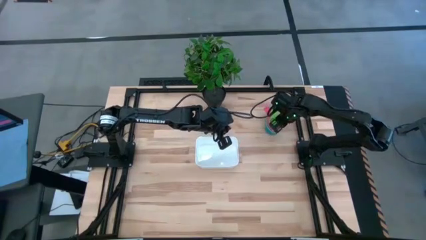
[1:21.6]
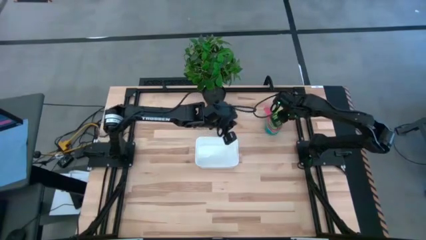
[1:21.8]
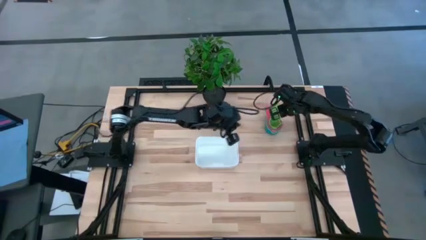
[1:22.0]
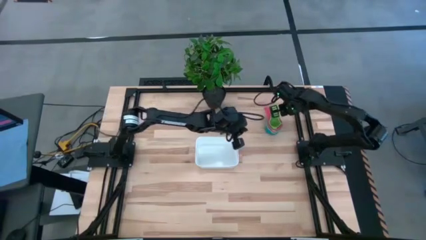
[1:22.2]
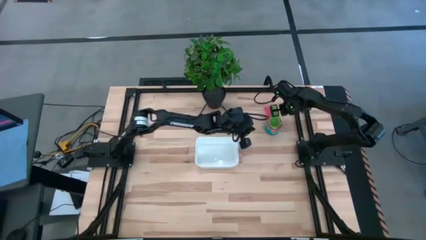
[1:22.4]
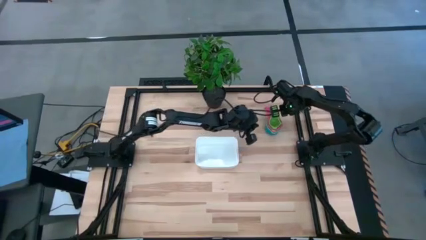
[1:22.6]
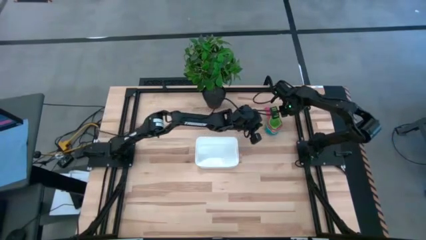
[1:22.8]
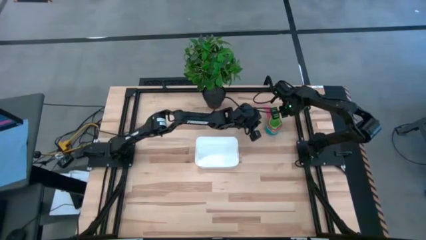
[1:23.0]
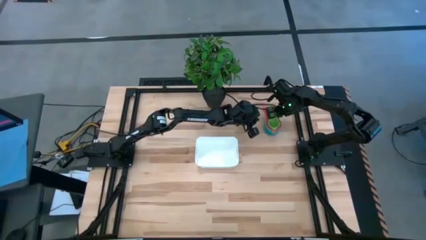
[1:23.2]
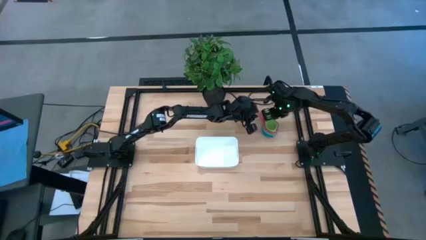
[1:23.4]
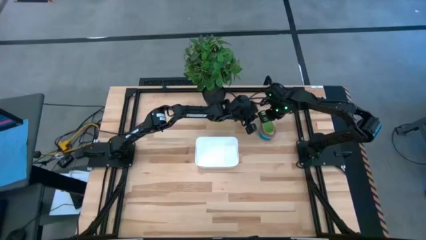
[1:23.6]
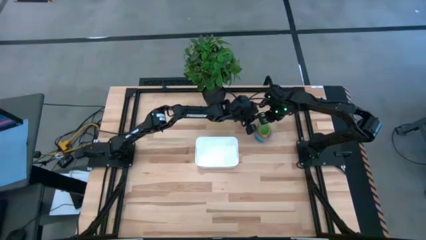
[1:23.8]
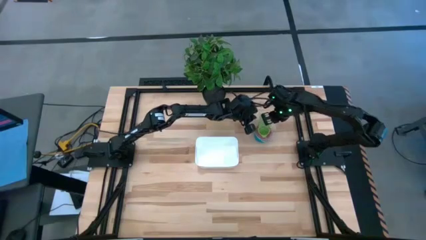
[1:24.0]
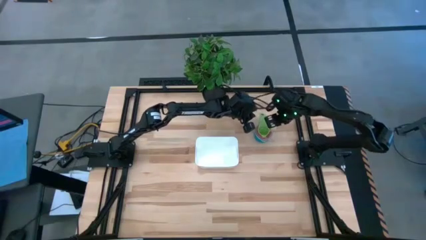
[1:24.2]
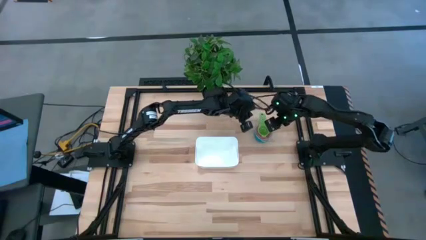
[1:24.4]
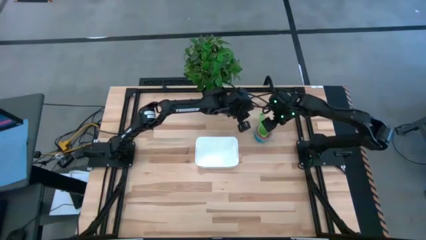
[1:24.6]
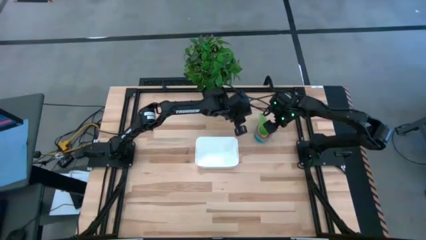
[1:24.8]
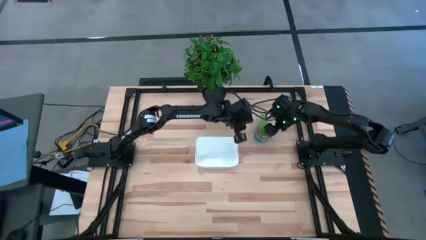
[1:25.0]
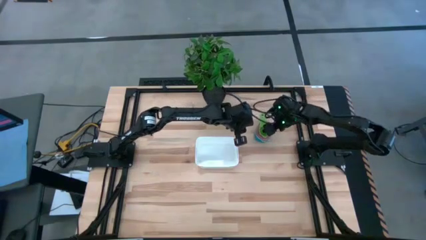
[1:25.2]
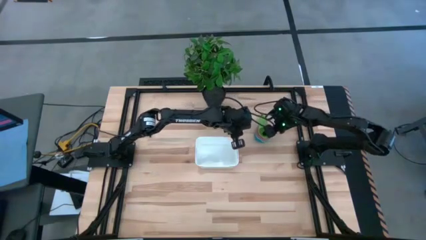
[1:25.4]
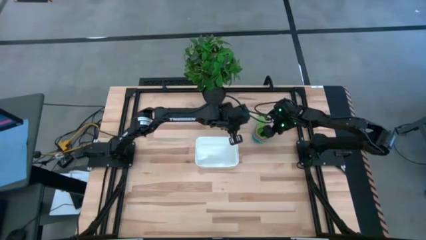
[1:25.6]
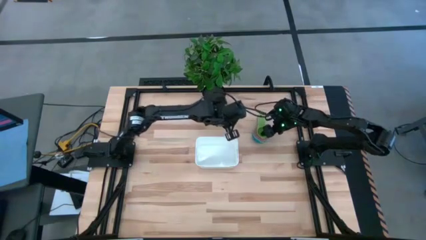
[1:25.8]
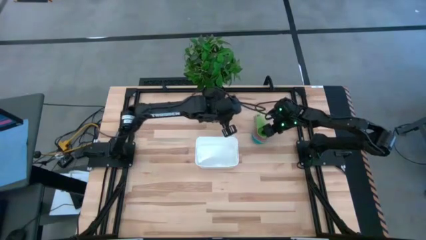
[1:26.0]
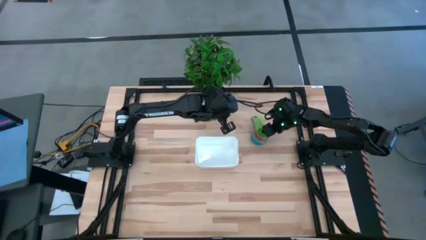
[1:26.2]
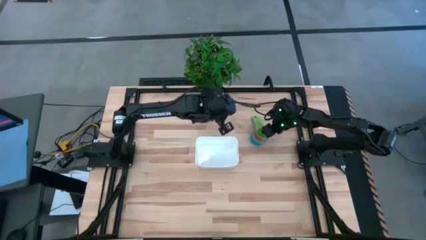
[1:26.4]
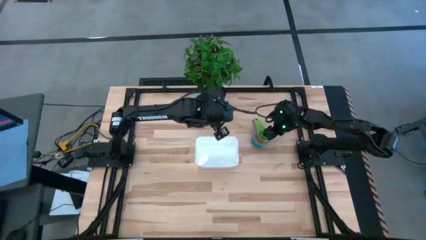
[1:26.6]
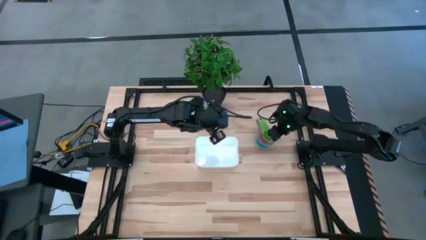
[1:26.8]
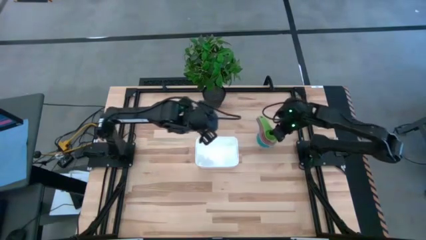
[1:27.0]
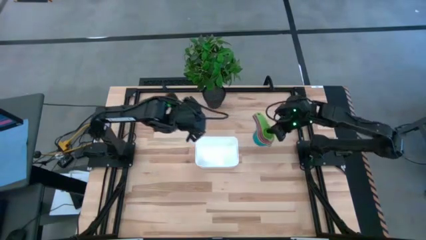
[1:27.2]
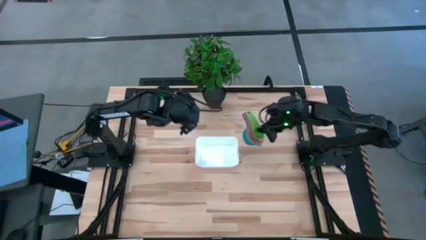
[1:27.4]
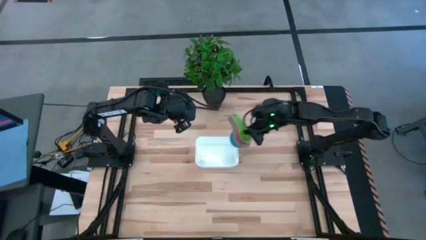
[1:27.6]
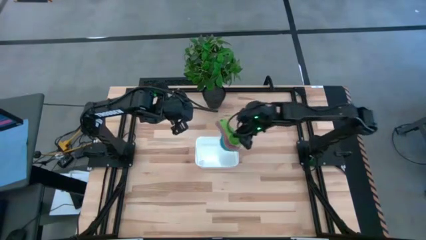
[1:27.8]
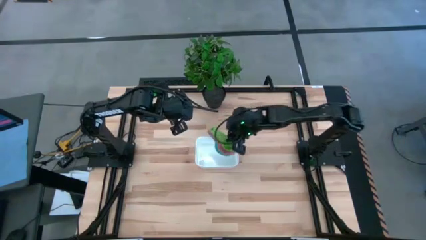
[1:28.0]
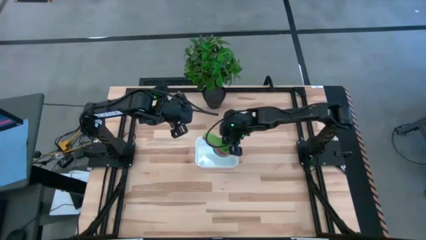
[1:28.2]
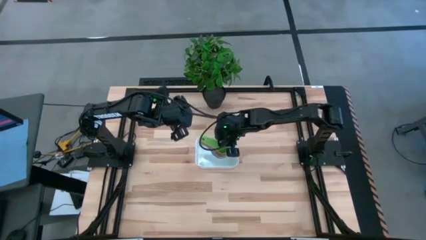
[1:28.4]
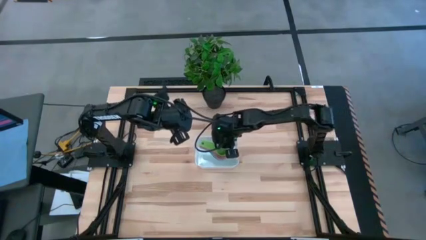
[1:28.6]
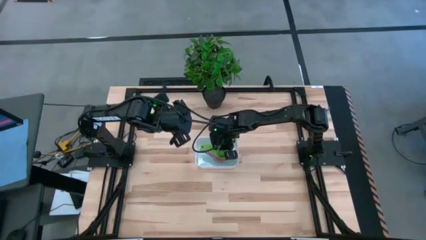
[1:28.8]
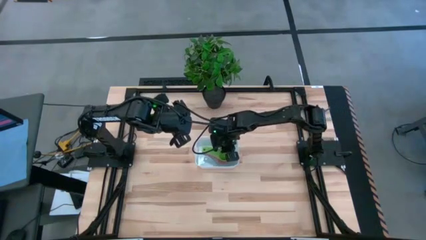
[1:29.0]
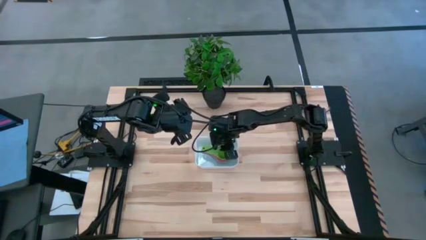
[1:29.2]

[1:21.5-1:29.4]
Task: Nest measuring cups in basket
Put the nested measuring cups into the white bin

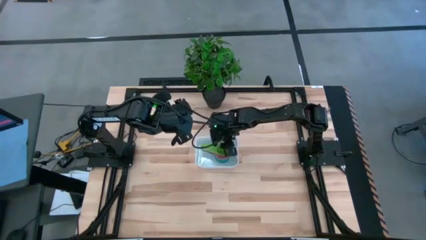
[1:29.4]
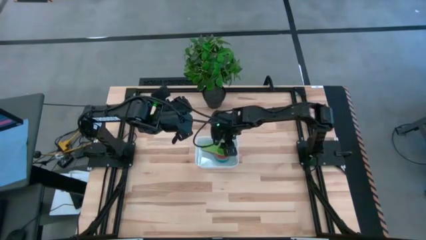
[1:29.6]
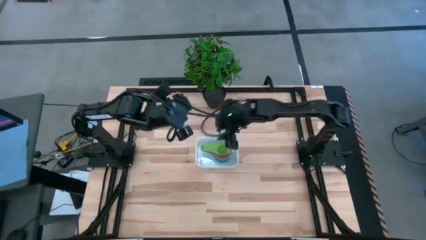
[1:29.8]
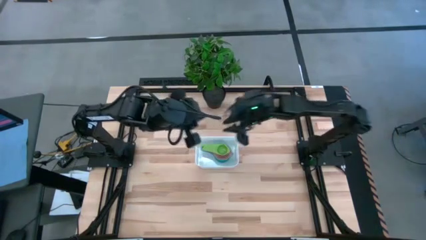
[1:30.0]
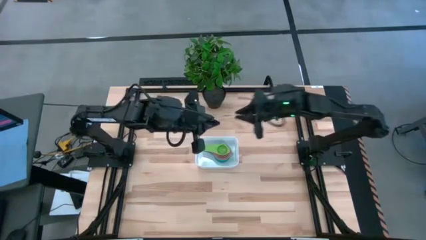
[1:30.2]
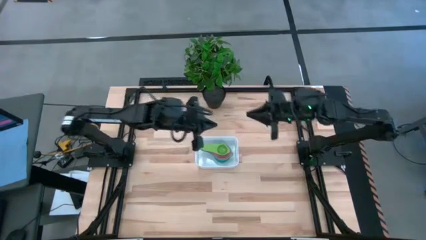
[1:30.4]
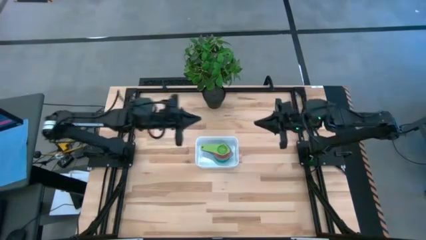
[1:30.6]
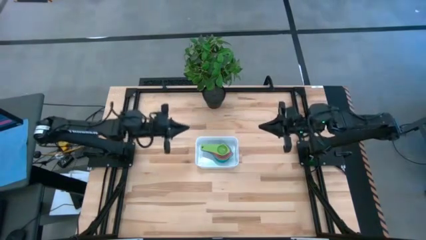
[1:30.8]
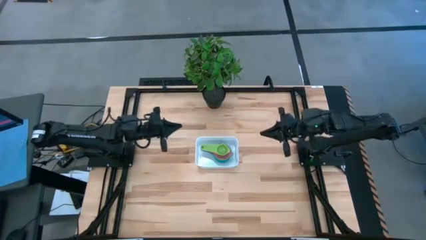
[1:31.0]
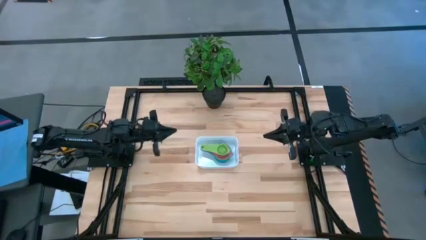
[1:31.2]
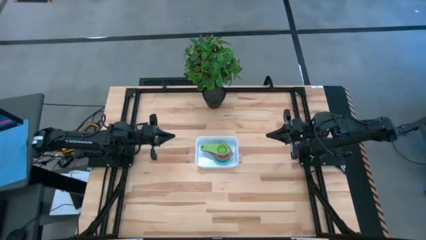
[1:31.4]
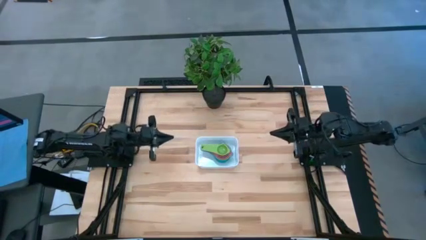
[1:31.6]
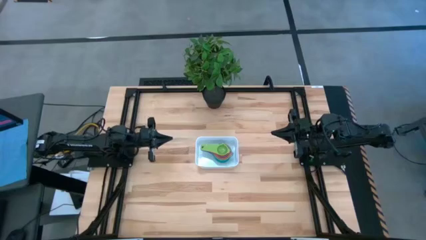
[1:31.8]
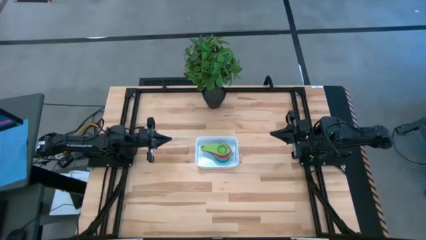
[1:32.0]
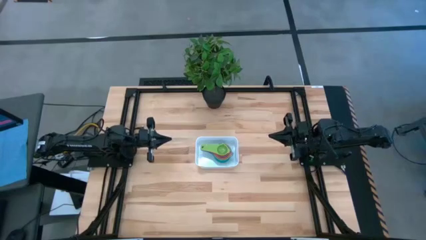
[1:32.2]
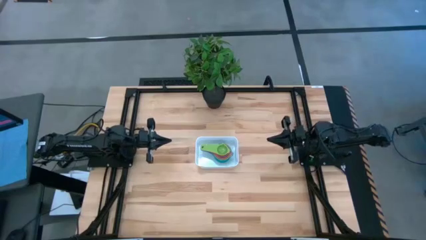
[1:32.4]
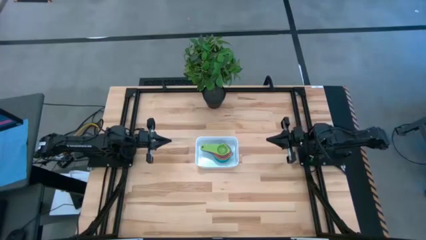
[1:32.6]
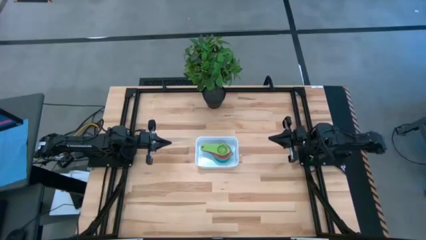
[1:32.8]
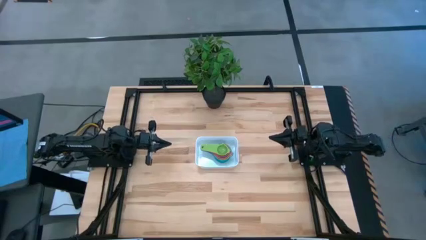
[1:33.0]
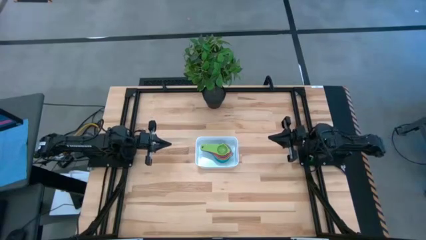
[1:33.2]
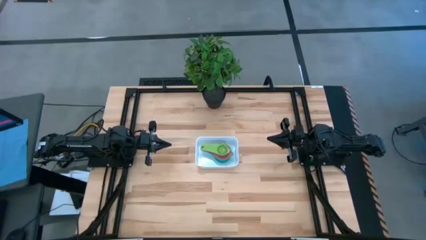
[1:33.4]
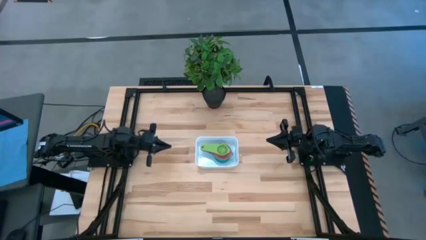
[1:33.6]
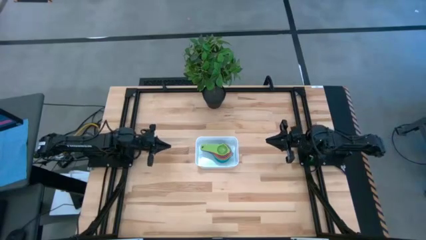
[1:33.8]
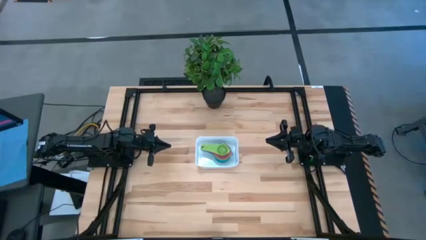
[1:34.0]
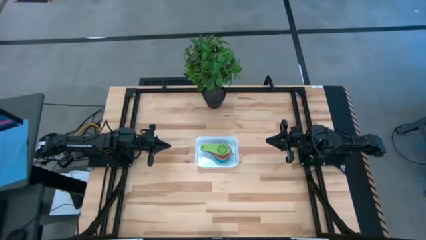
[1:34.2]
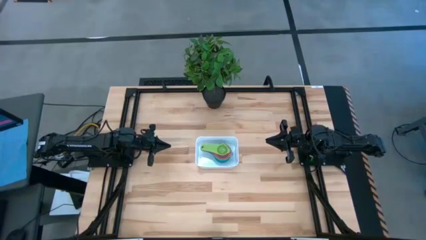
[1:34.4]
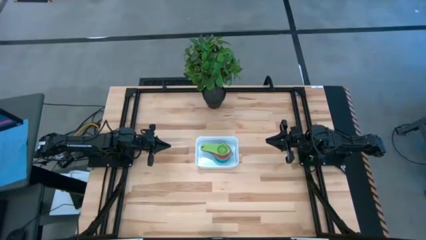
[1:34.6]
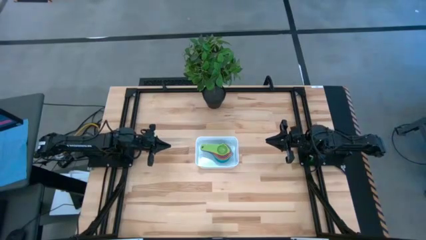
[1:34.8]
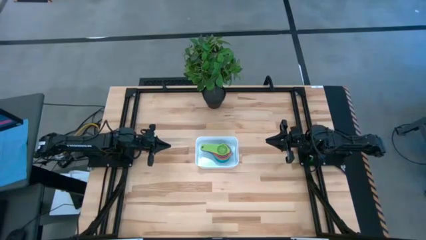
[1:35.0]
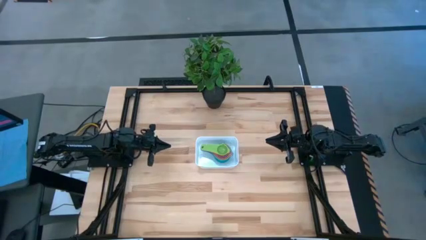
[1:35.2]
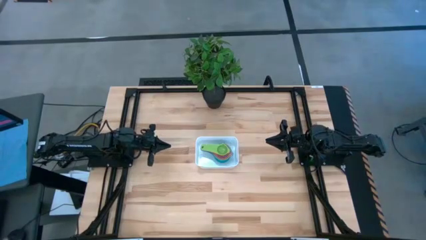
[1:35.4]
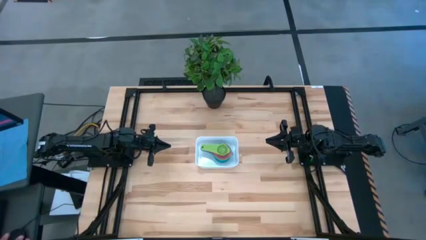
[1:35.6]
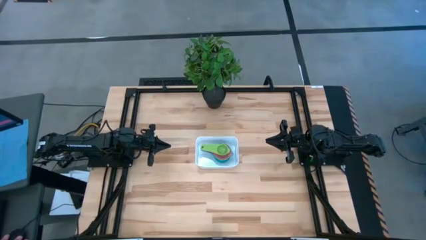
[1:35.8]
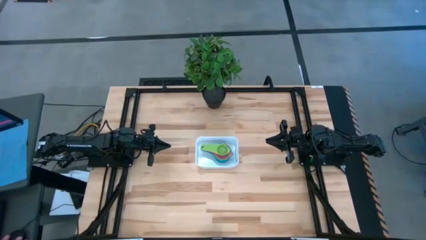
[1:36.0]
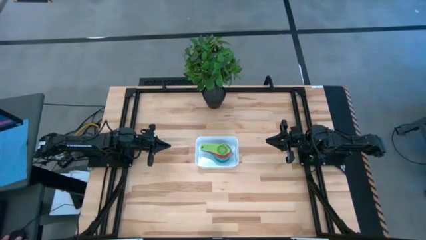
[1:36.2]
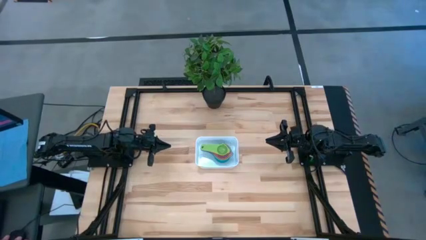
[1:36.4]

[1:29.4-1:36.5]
Return to Home Position

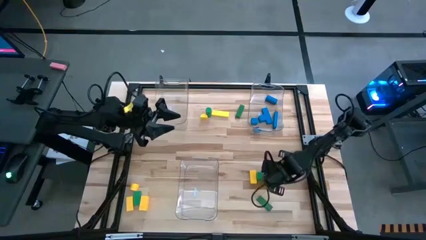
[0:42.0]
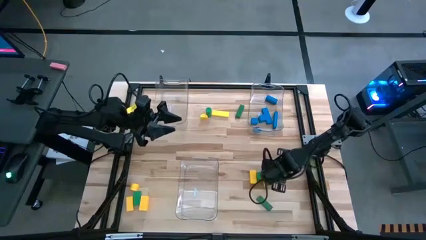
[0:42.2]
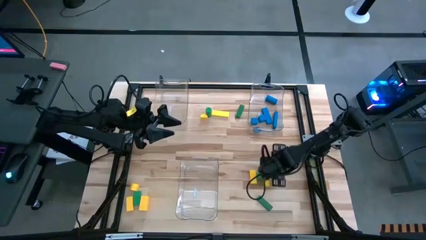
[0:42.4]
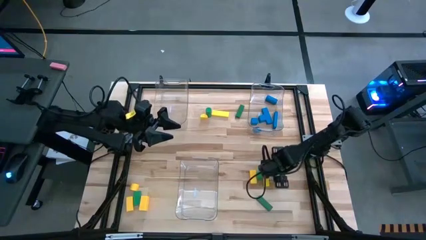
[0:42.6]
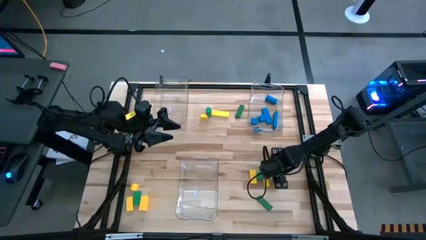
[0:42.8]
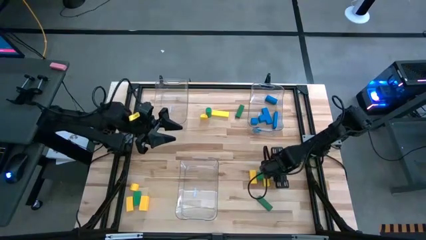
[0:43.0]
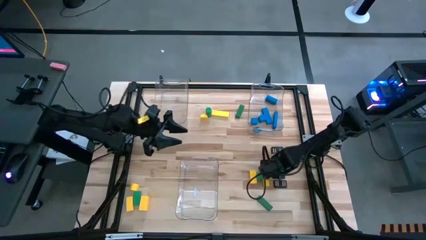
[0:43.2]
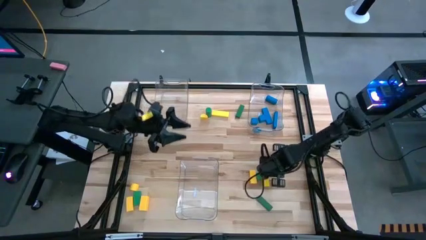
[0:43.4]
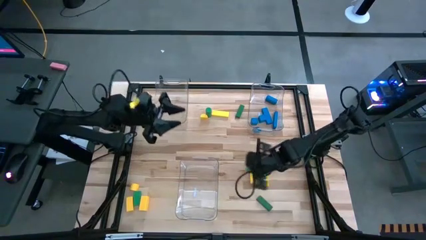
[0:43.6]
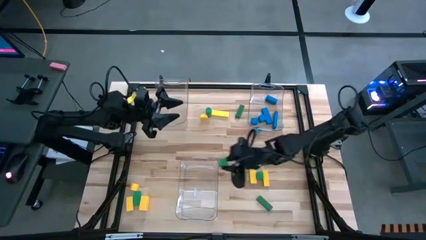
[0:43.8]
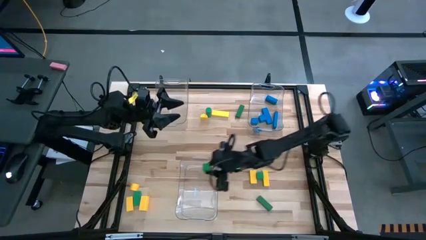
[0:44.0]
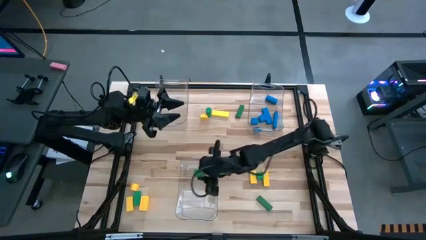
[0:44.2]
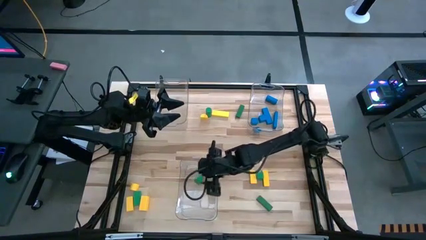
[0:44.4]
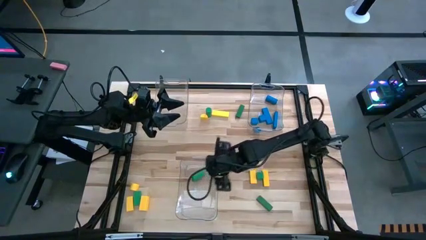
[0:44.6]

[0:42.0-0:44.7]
Task: Sort blocks
Put the green block into the bottom transparent bin
